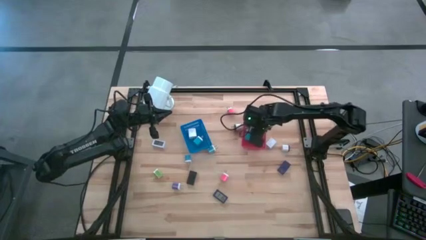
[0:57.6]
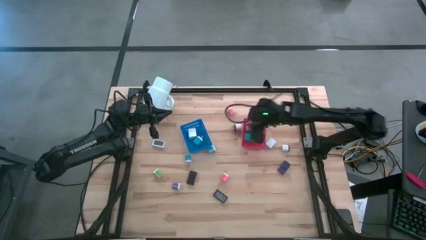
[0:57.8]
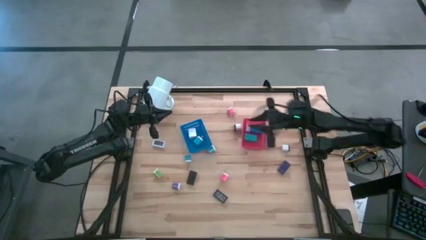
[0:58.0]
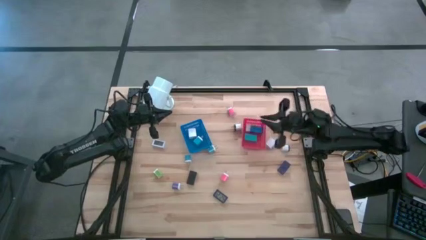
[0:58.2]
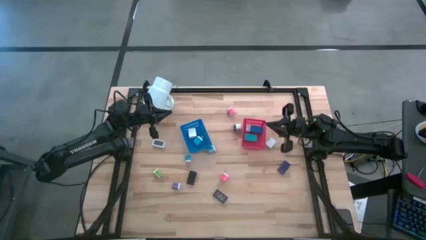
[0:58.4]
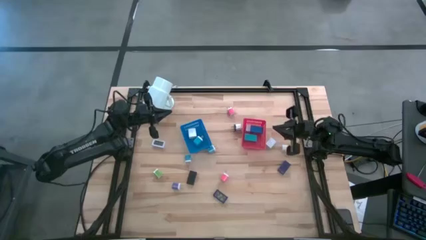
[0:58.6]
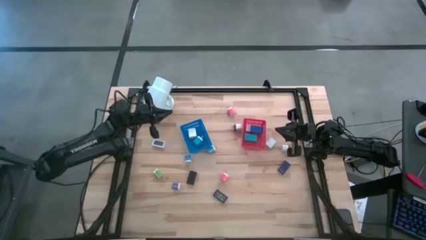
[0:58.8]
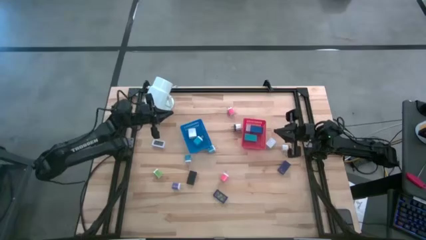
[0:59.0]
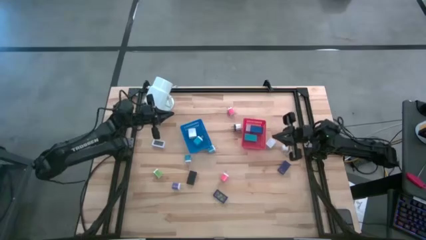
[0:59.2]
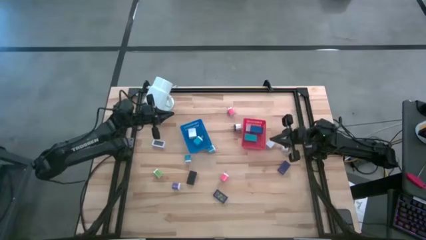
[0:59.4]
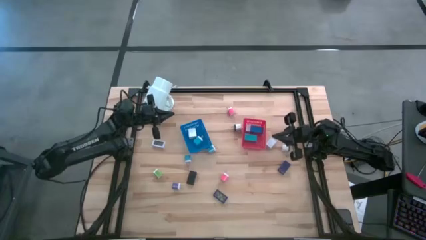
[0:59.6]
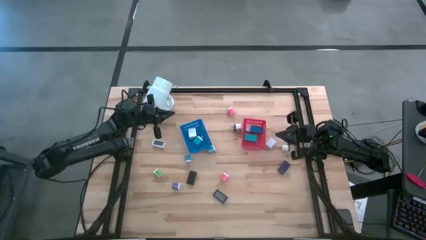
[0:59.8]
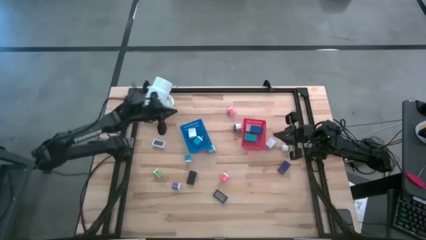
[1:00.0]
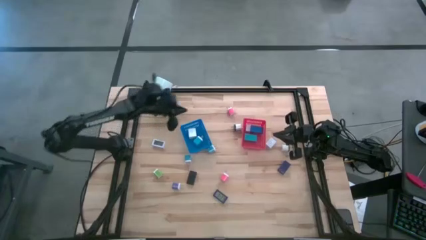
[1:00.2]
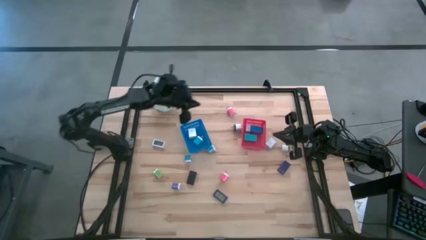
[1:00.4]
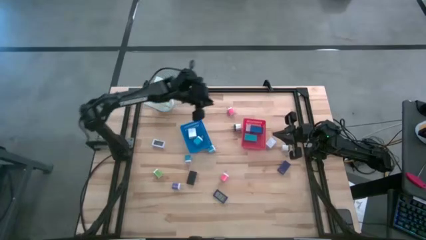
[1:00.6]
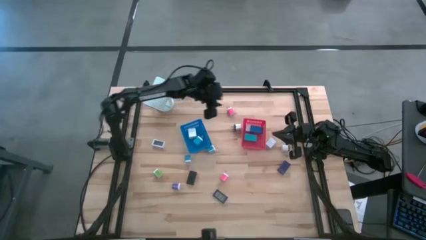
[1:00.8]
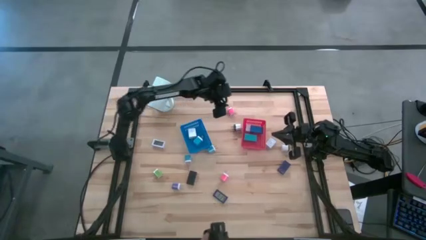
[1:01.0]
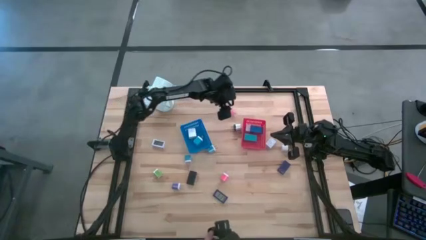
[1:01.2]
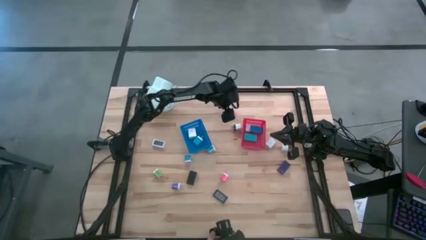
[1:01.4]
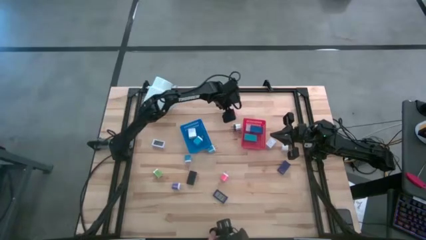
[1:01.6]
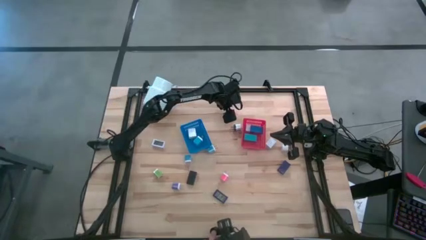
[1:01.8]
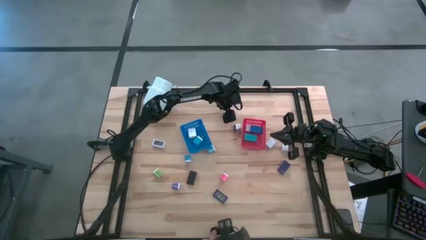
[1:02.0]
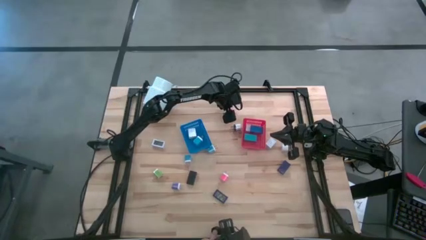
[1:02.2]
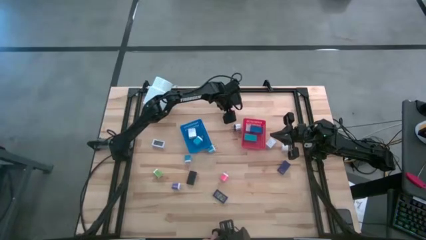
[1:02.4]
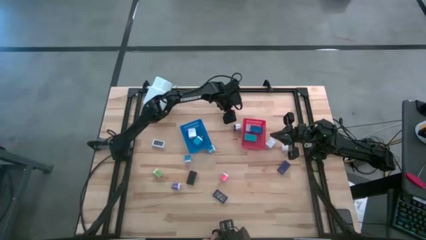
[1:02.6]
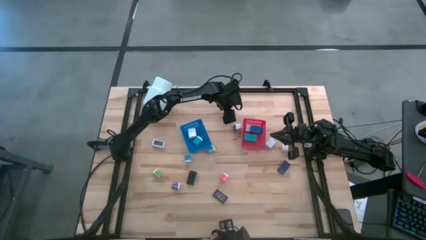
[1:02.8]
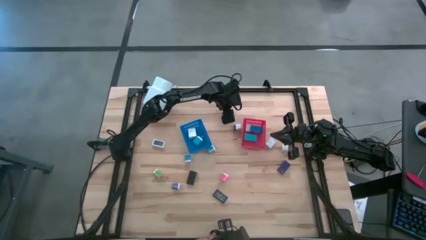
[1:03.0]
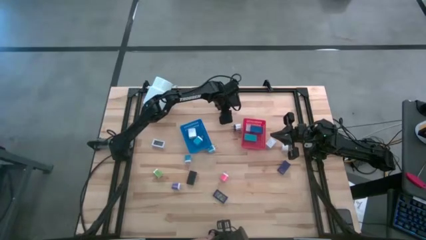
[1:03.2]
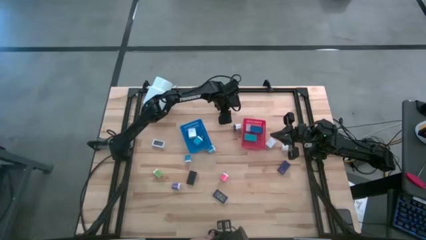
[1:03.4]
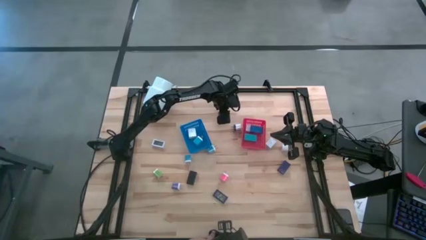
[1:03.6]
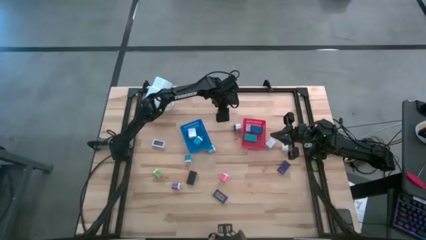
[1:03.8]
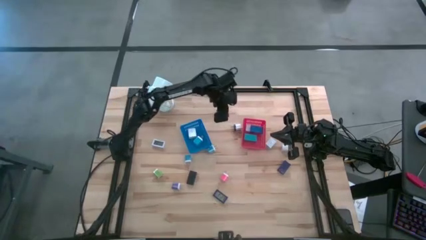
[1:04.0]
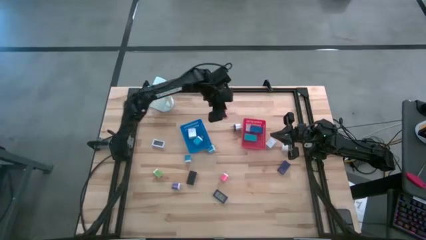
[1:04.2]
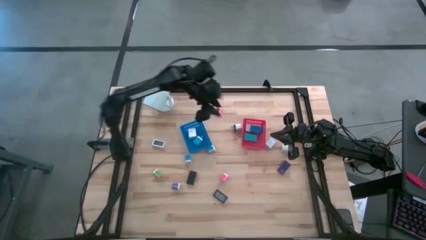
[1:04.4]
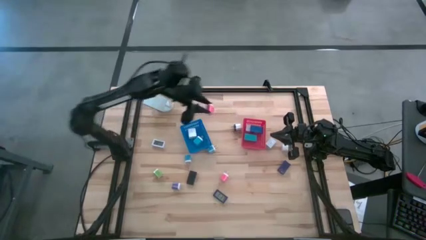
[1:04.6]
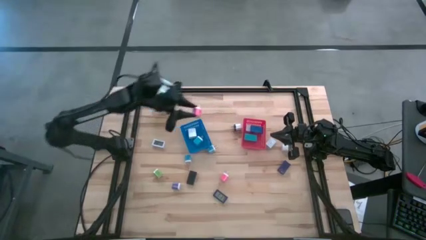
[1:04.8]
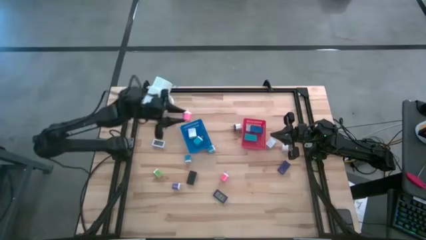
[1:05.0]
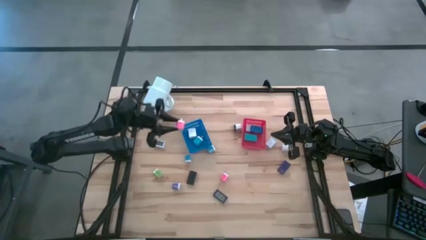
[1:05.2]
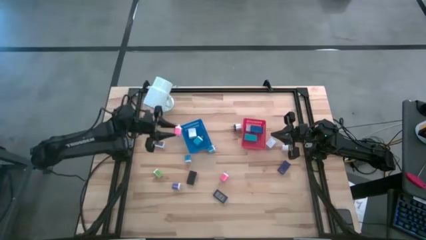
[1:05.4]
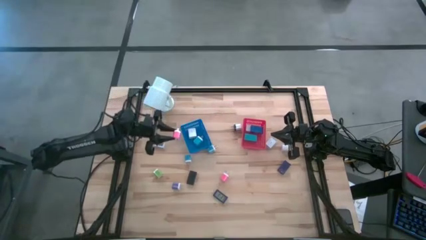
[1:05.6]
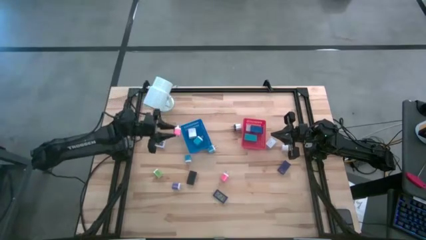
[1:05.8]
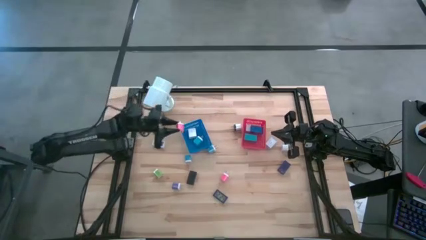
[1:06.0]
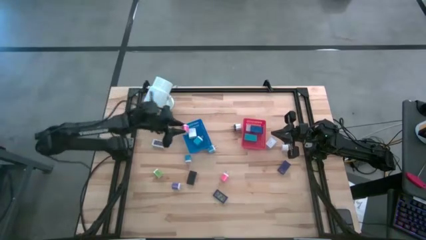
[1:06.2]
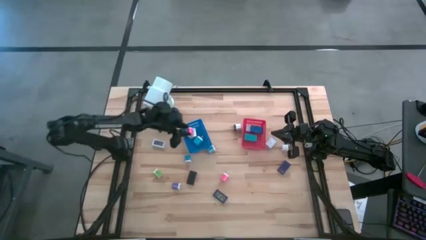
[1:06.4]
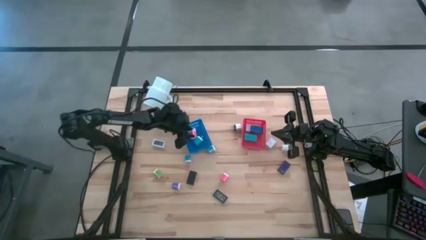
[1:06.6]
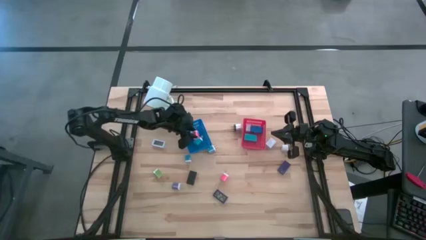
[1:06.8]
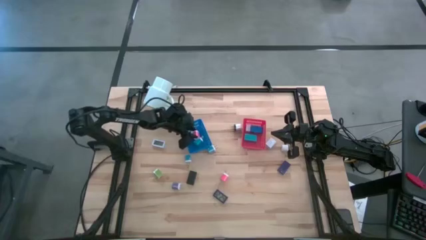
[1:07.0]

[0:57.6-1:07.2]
Task: Pick & Place Office items
Put the top pink charger adapter into the blue bin

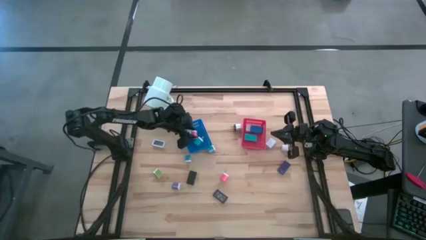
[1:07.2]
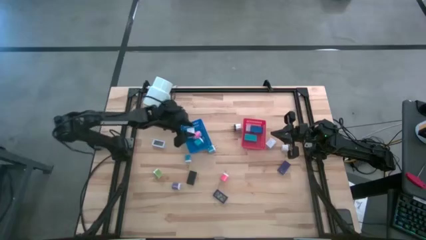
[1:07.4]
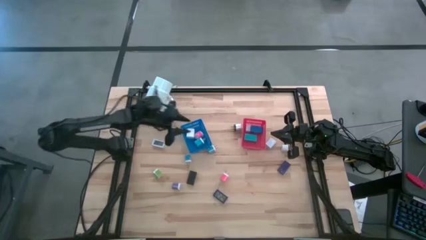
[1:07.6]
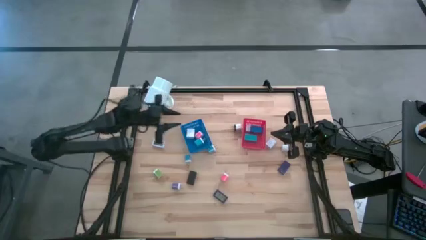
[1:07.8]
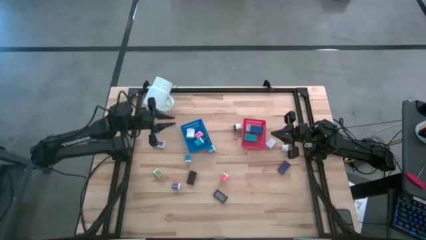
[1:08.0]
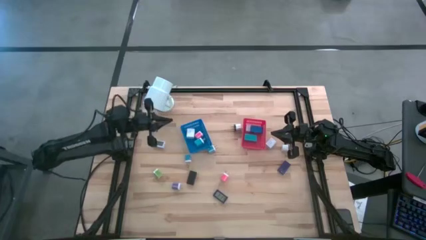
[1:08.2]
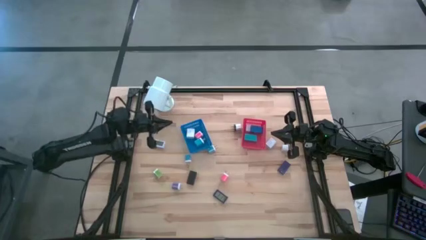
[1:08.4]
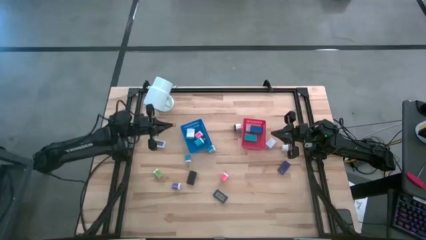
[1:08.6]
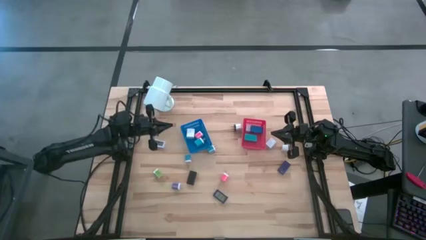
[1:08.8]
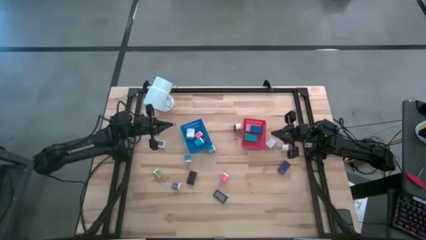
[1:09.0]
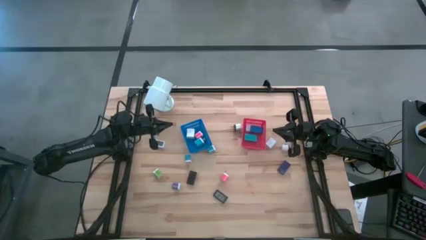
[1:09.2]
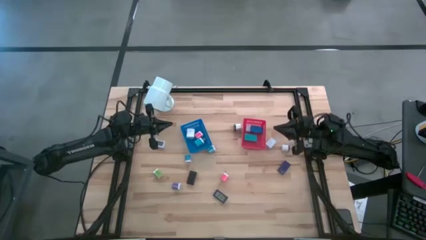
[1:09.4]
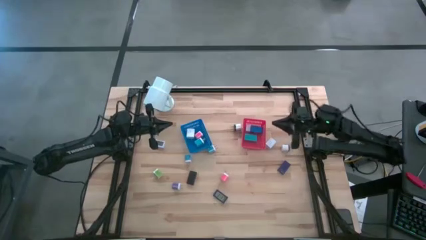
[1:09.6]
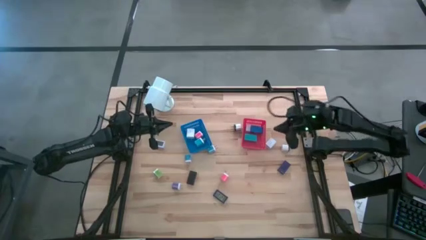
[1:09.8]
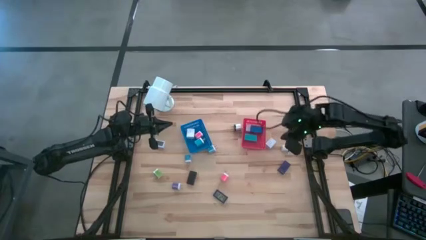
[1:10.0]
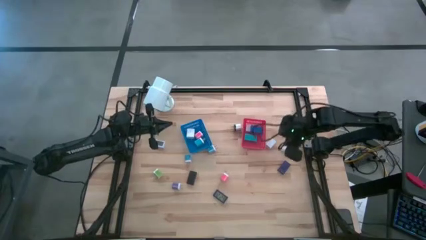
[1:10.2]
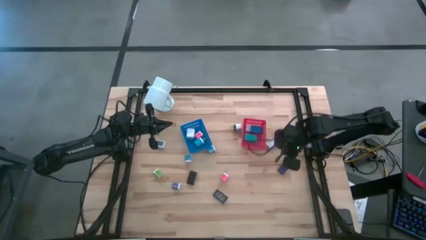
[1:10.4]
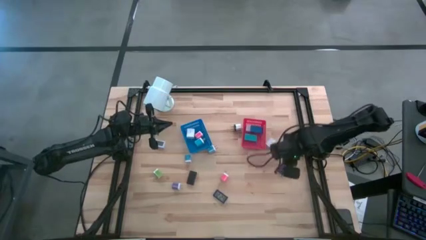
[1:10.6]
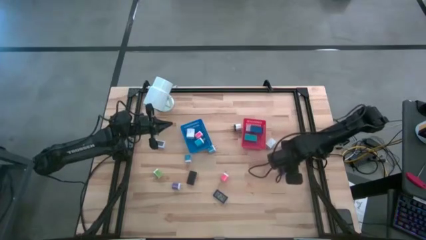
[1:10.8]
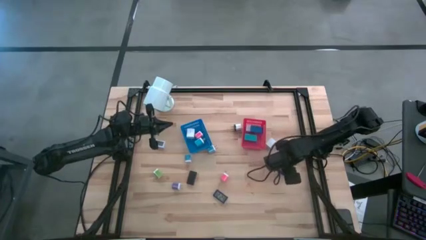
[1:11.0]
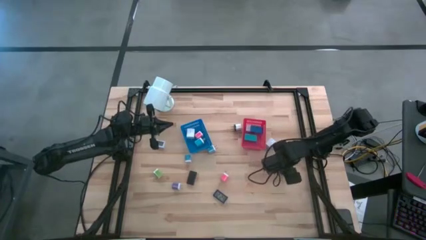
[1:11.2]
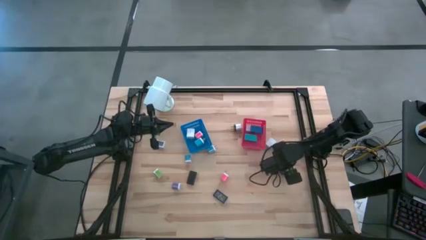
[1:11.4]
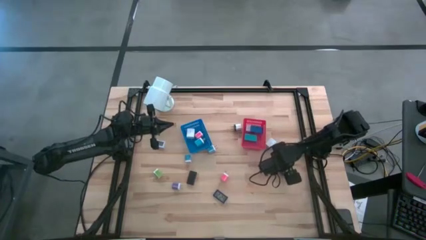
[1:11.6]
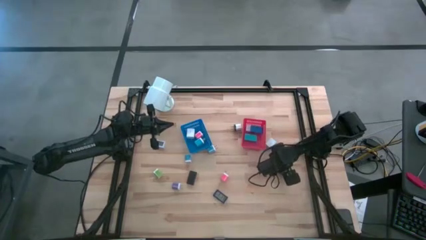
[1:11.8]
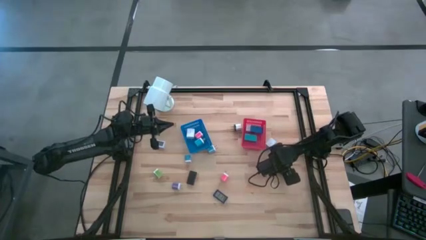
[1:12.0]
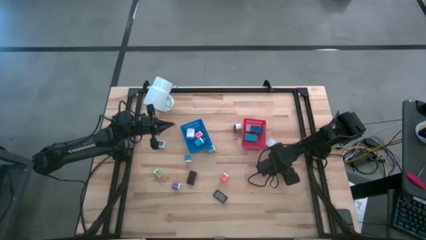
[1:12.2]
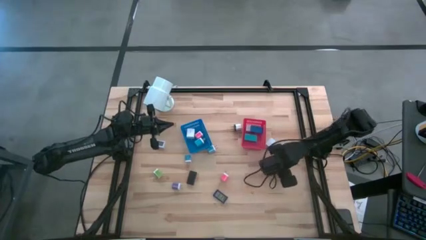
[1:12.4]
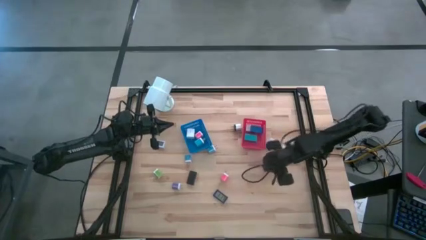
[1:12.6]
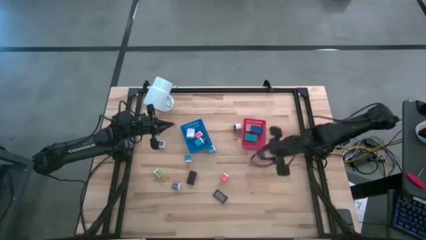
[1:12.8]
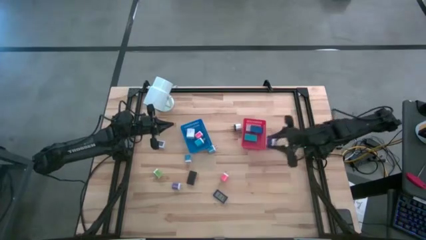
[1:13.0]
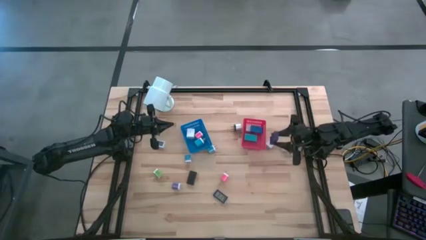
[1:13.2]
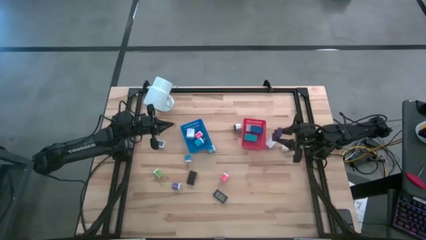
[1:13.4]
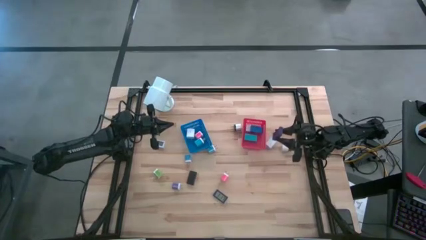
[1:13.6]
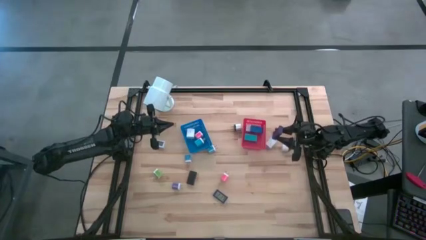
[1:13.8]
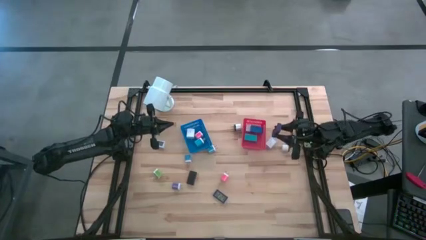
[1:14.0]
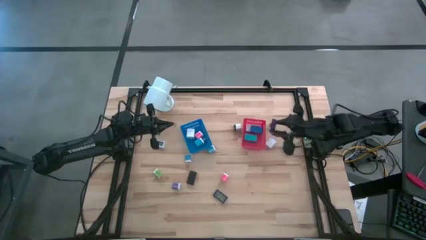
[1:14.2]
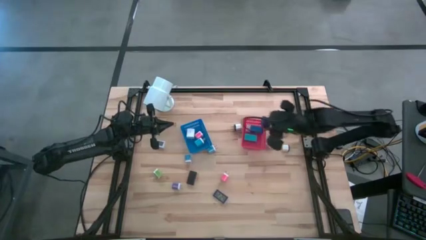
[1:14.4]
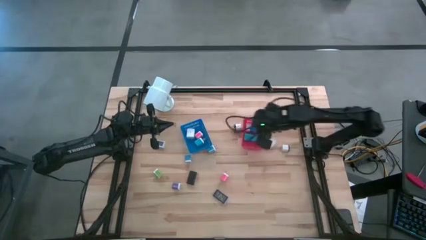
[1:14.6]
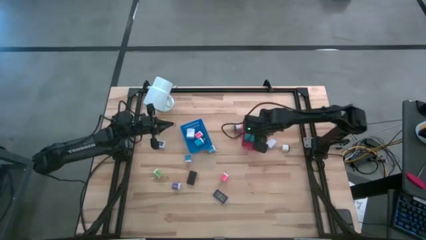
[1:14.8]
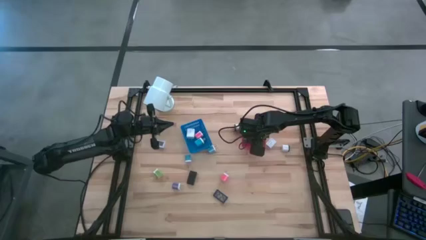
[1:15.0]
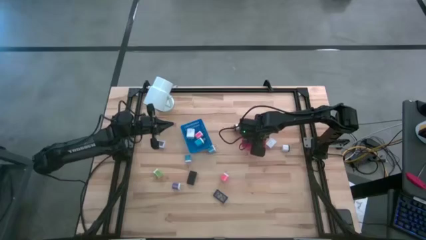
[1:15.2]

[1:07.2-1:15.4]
Put the right purple digital clock into the red bin
